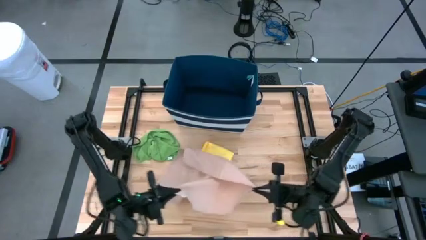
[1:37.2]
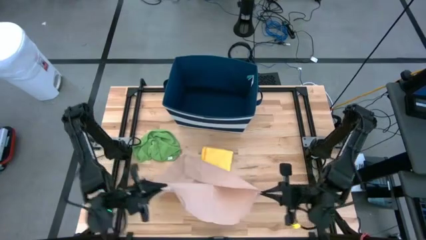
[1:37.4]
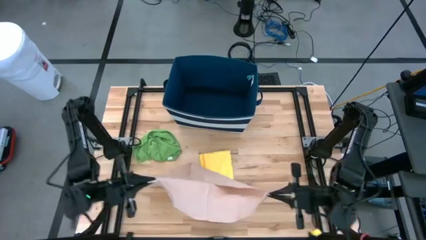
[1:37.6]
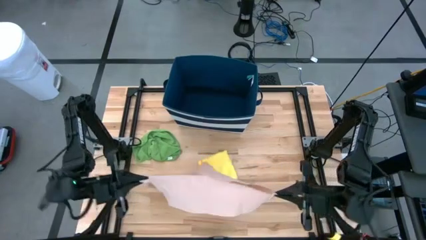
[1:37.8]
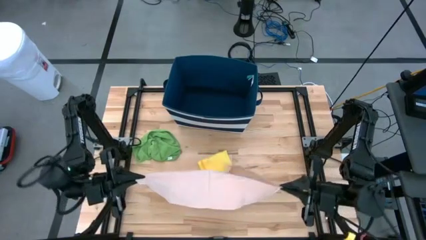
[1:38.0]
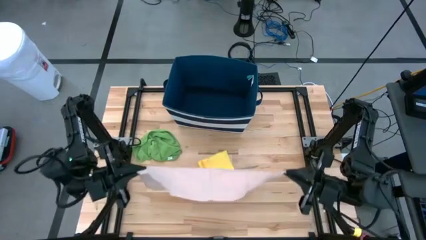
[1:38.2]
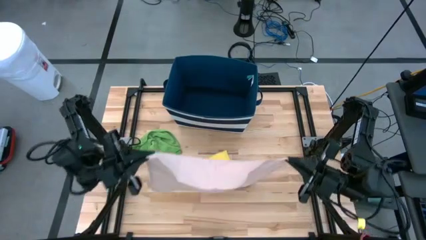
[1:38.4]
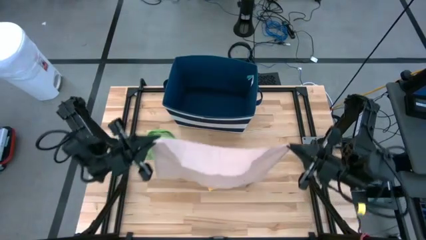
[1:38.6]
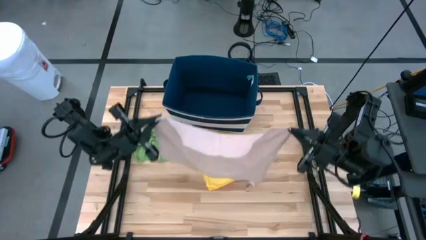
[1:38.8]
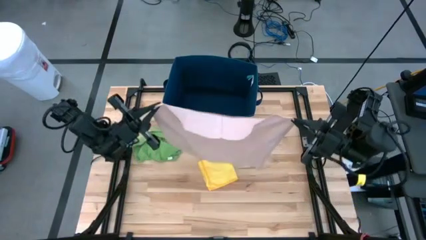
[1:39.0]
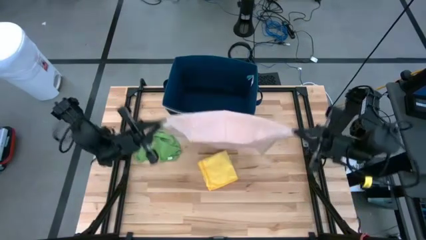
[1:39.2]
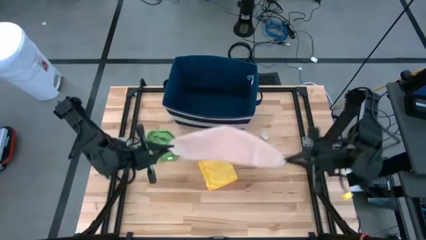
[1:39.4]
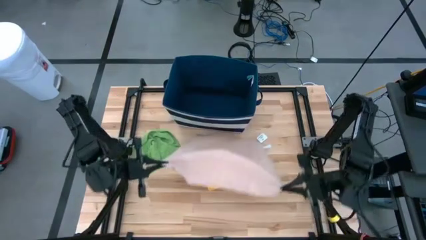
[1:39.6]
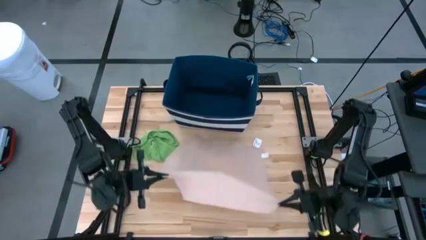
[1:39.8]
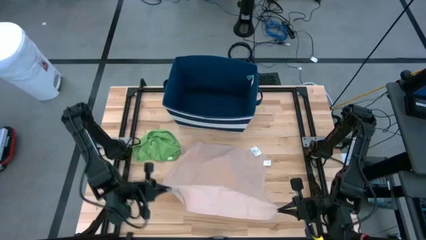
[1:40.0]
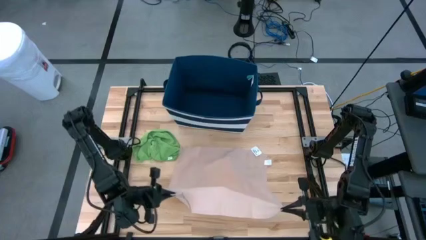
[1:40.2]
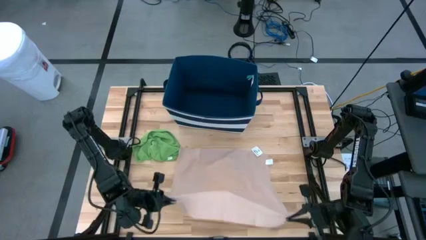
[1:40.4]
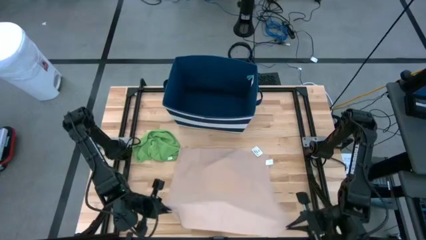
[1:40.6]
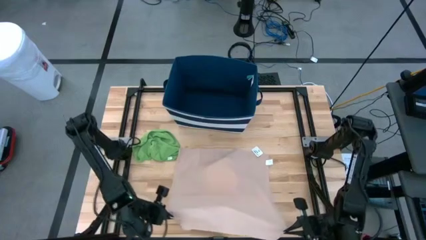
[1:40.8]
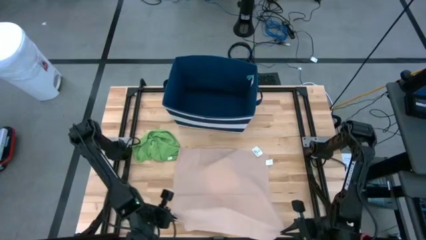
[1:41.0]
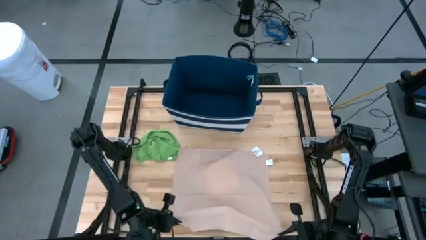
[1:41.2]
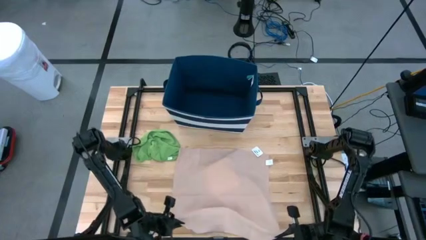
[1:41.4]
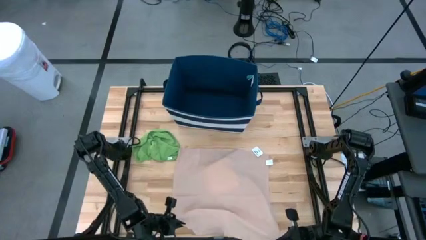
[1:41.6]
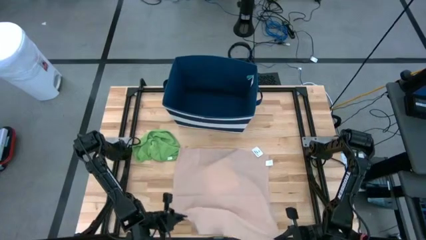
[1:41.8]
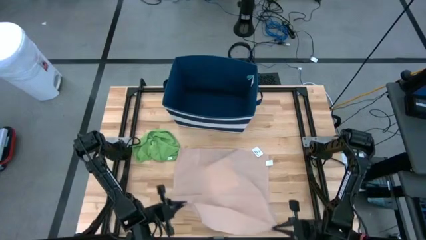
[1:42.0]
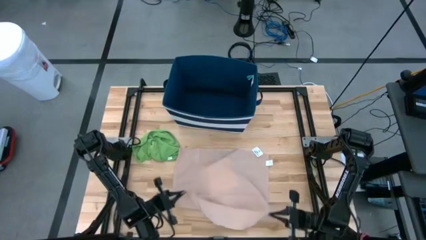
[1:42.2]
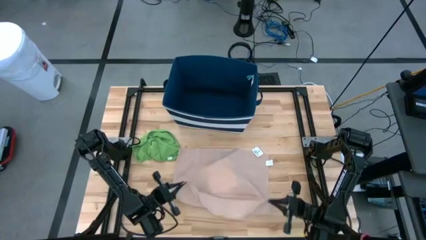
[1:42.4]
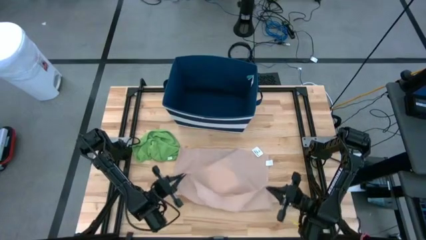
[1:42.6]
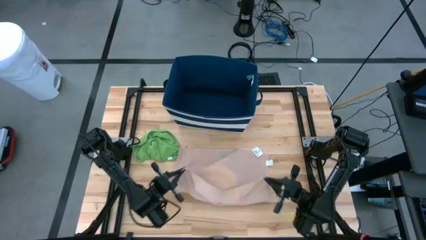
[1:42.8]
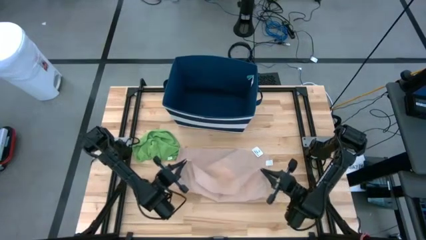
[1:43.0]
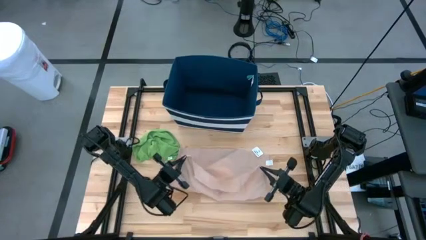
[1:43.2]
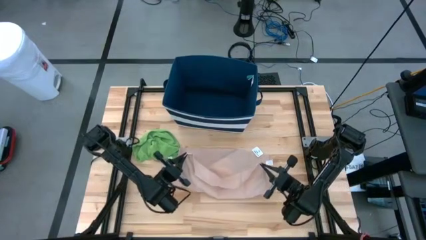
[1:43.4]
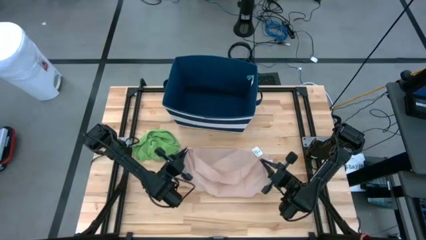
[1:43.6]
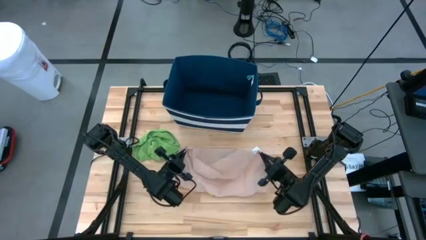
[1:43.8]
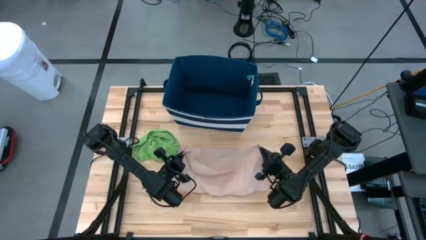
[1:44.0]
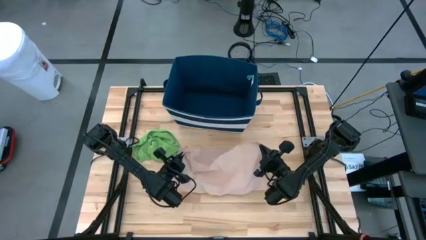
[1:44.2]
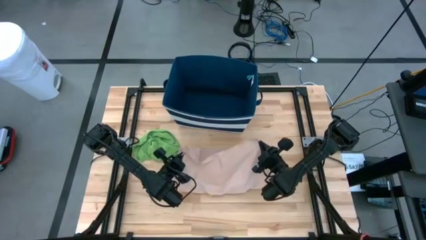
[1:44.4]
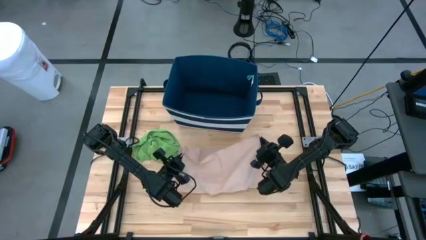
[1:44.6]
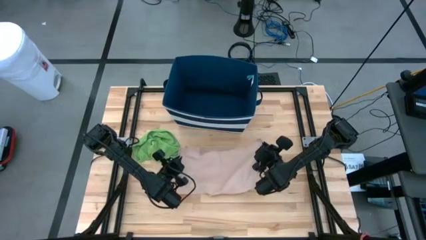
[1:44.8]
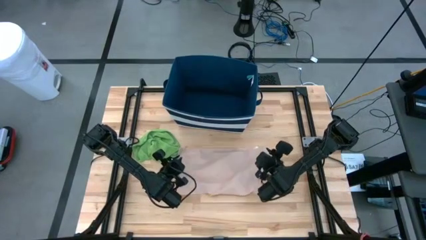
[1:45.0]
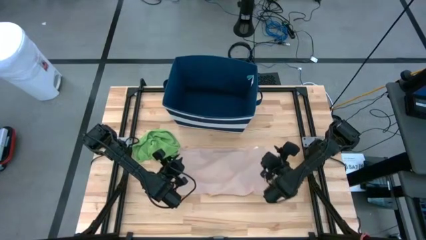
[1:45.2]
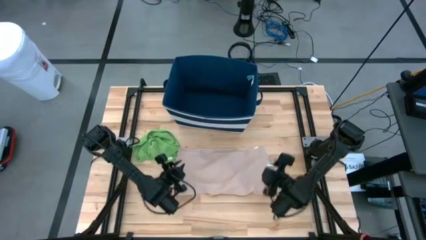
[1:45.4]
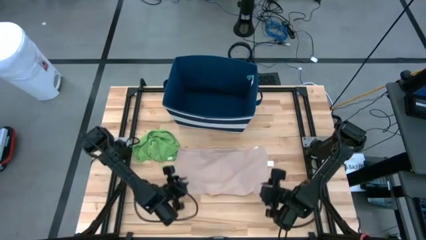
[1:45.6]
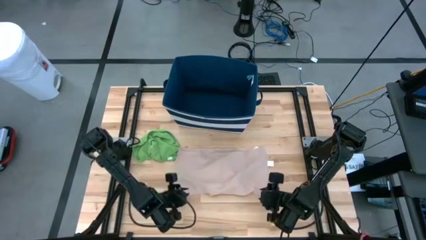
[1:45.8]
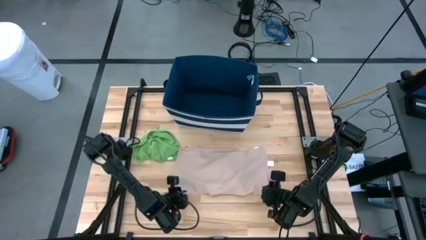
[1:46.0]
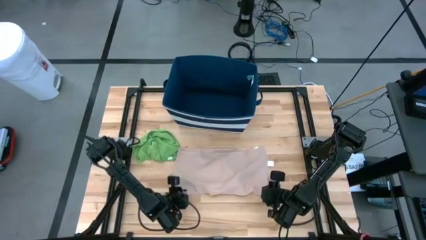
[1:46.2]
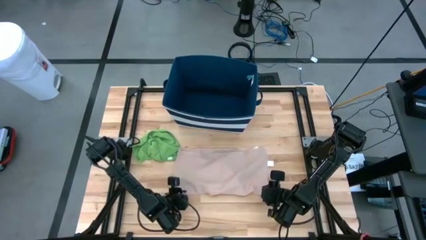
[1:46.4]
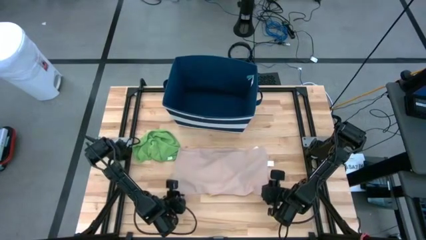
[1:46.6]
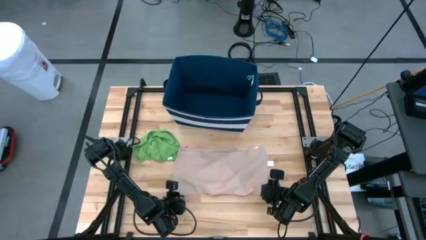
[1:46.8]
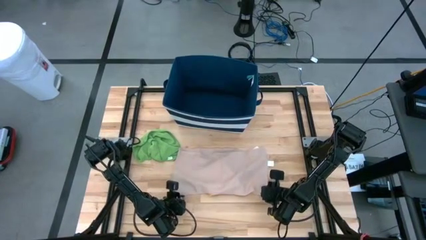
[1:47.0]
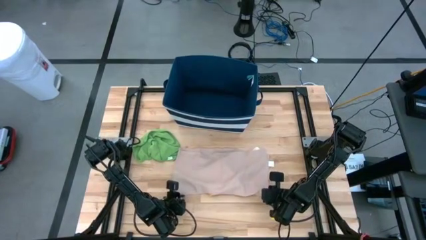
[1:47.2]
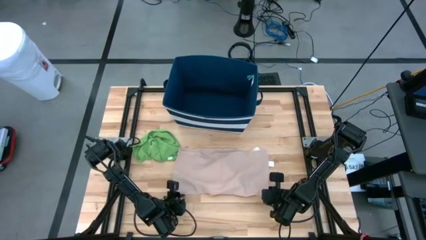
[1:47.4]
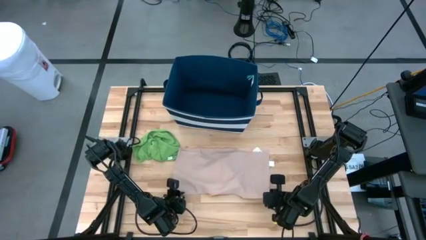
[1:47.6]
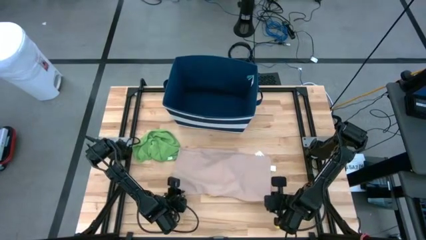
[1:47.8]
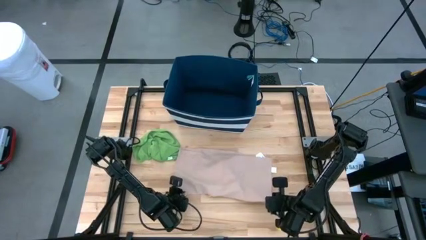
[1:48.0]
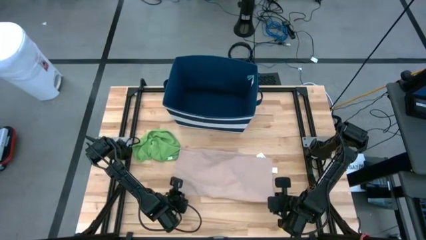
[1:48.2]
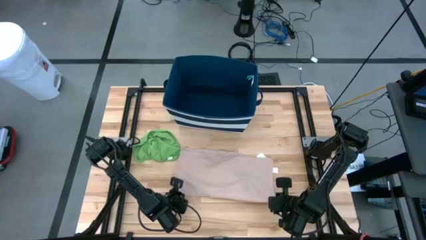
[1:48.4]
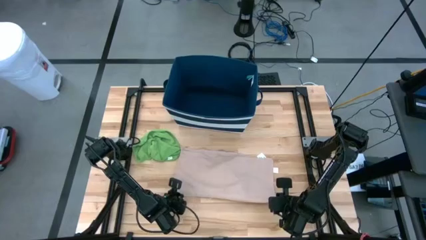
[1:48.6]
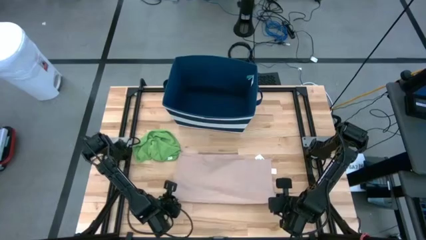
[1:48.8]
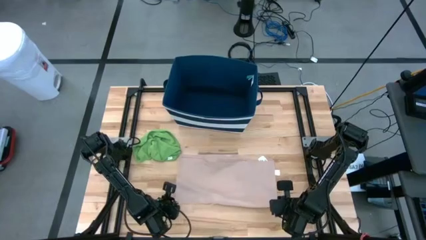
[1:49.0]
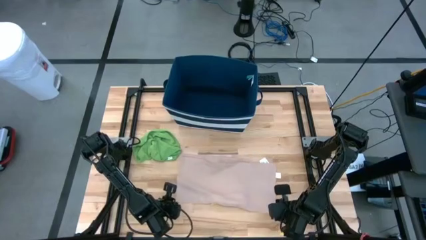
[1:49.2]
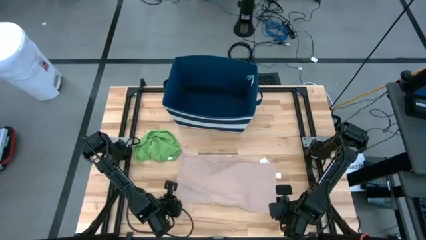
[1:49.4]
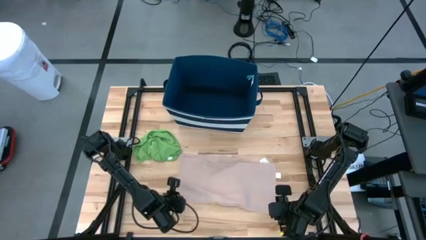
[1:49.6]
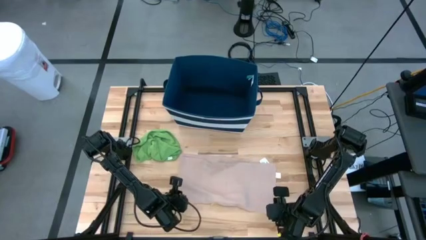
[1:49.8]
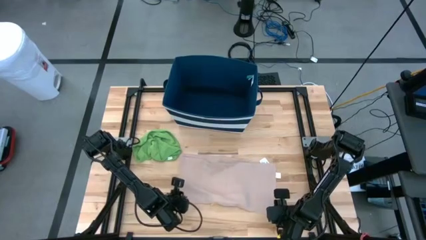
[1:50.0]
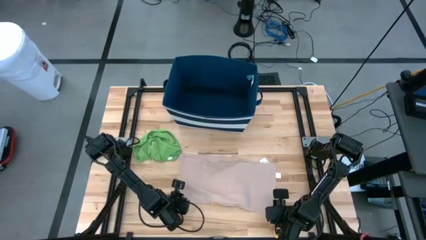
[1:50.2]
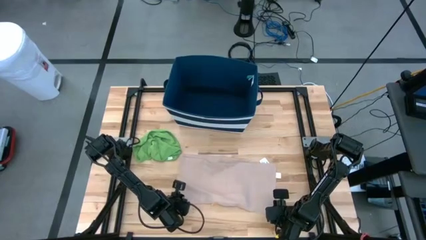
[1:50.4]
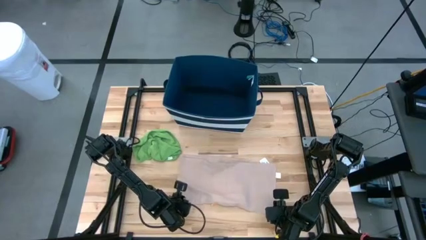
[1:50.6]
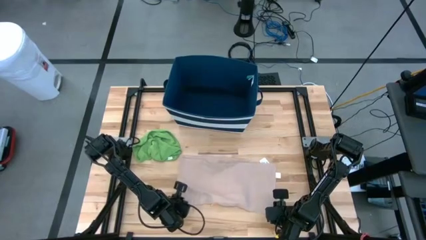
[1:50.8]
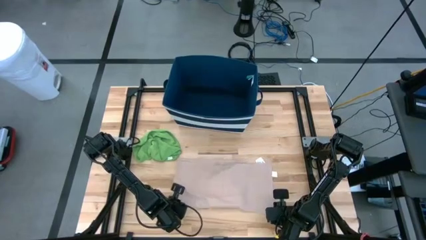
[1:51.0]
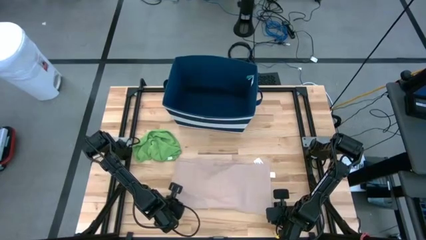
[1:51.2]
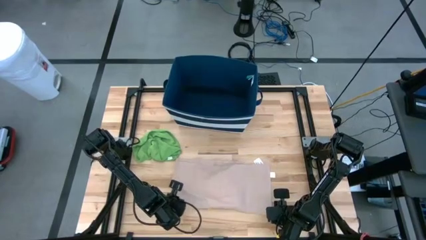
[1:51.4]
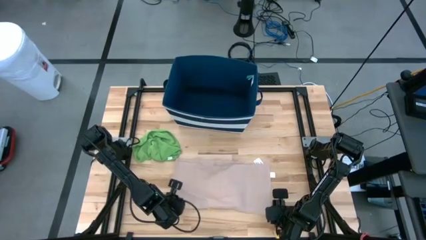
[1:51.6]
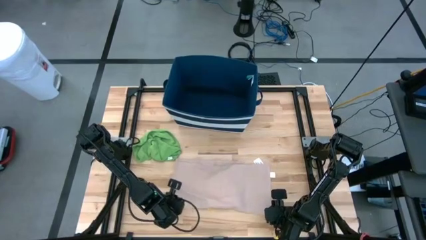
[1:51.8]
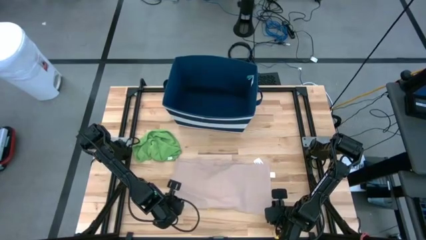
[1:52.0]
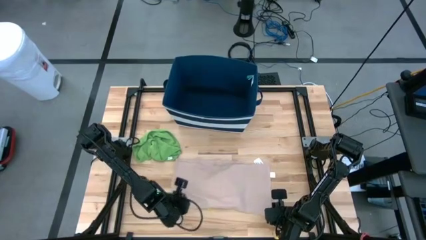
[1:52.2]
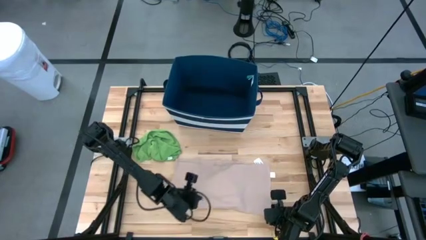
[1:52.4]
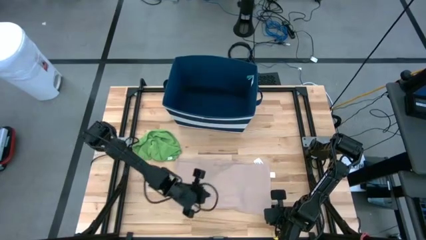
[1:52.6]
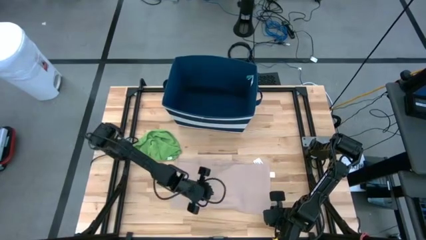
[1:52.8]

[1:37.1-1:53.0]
Task: Fold towel
Fold the brown towel
